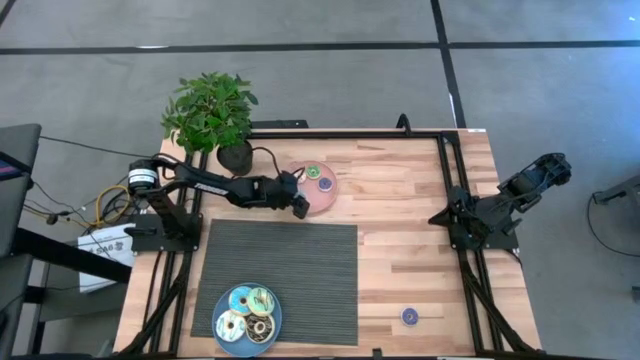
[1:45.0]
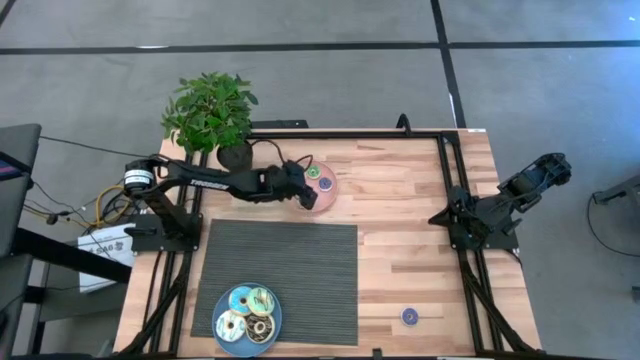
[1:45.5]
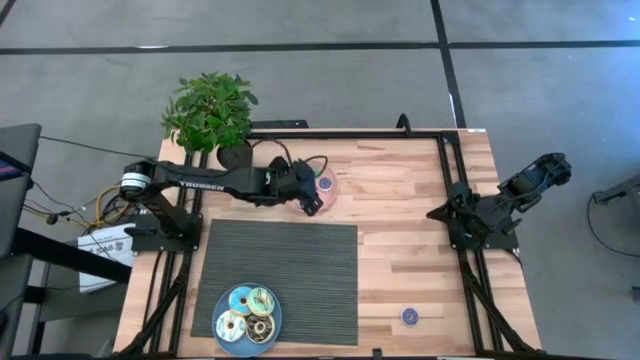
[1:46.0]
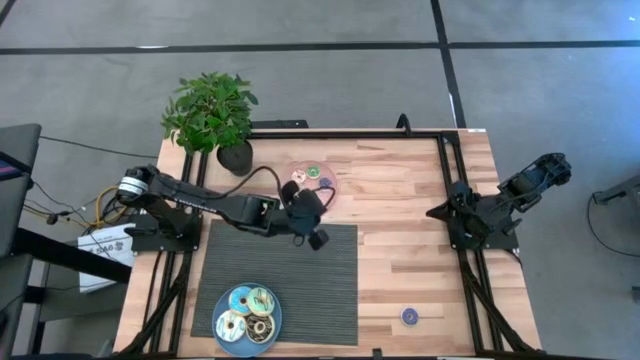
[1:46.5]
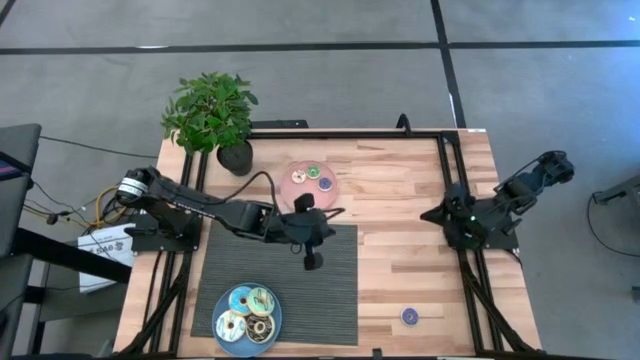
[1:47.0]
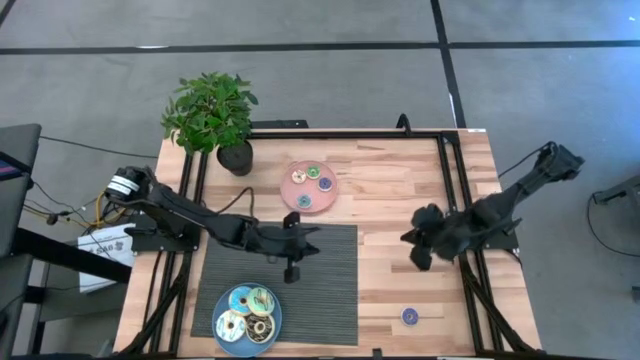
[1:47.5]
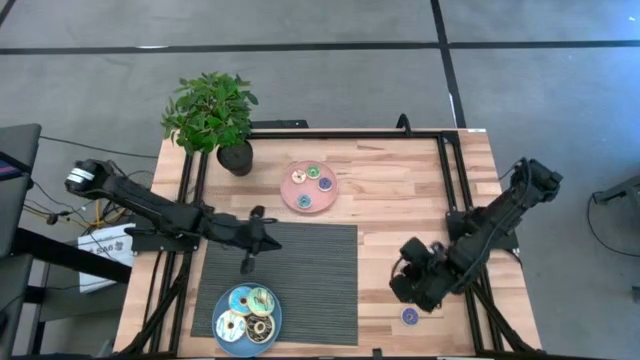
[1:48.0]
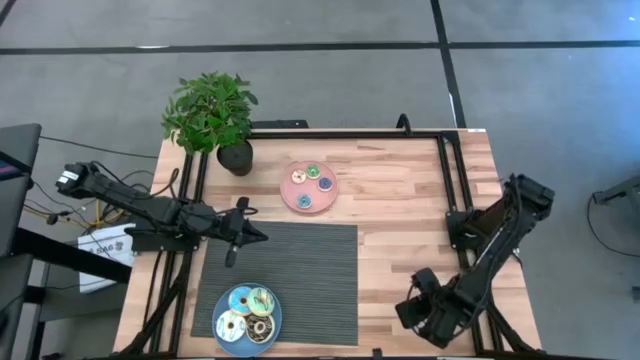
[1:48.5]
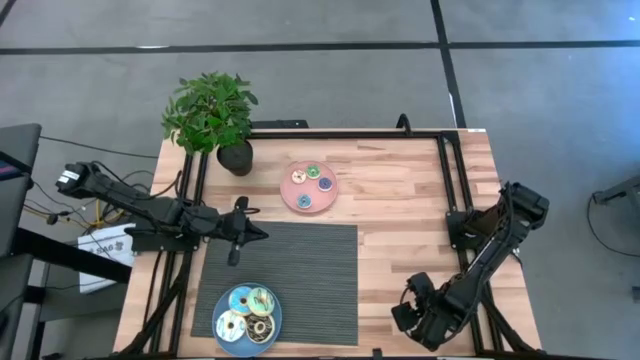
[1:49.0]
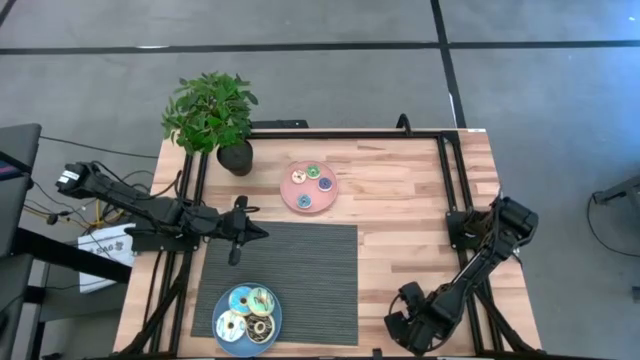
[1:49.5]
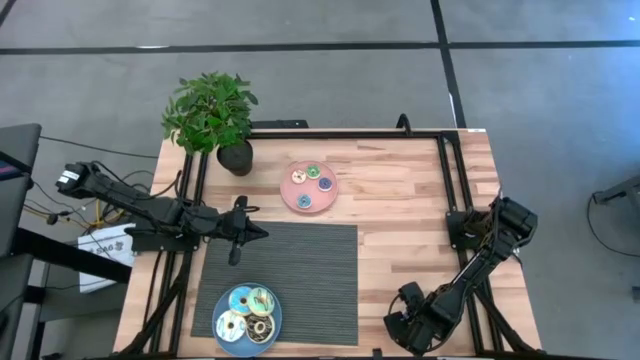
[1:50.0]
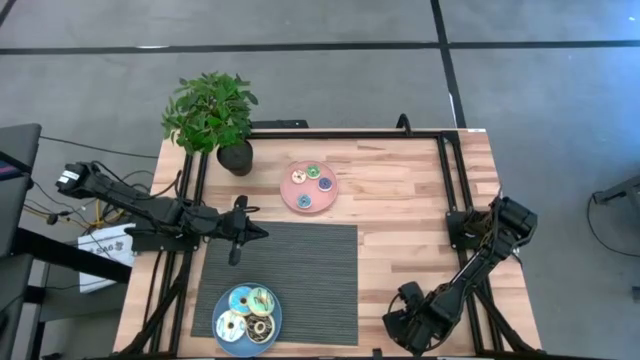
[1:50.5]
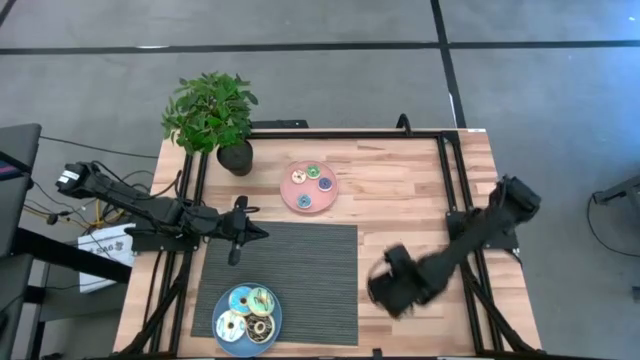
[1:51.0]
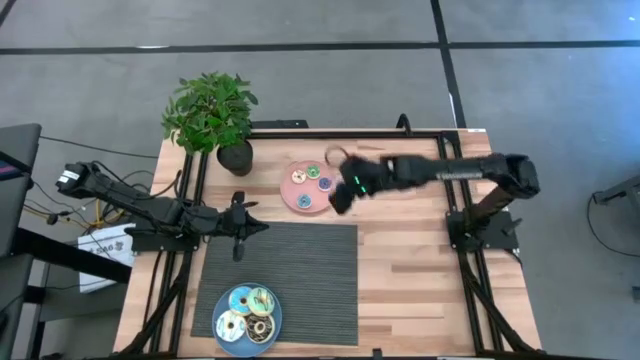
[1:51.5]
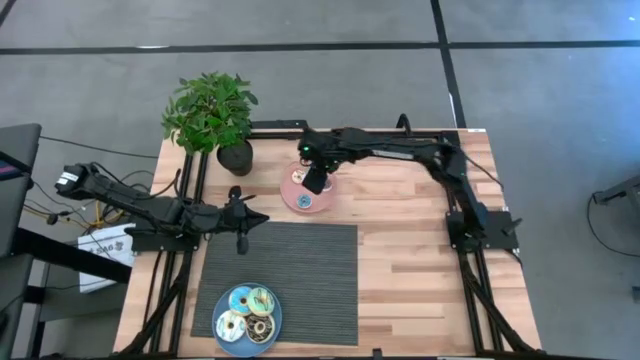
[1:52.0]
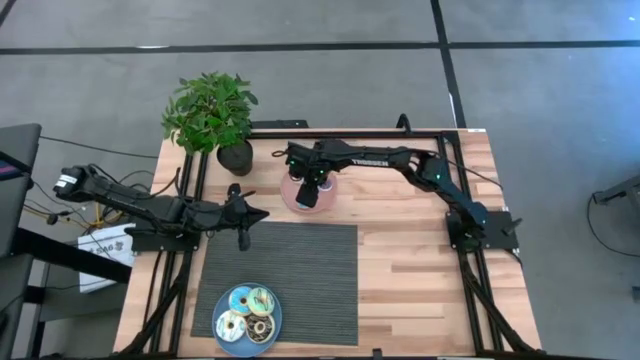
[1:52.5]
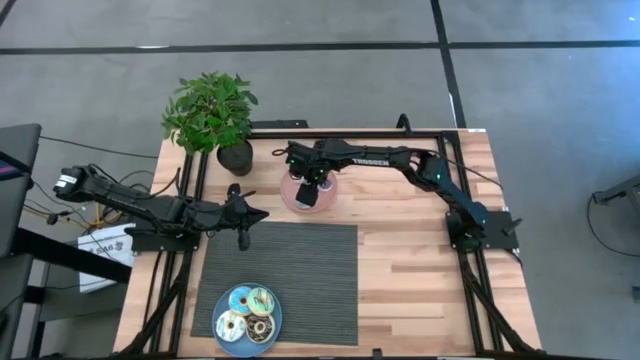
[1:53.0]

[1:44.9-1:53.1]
Task: Pick & Place donuts
Put the small dark blue donut on the pink plate

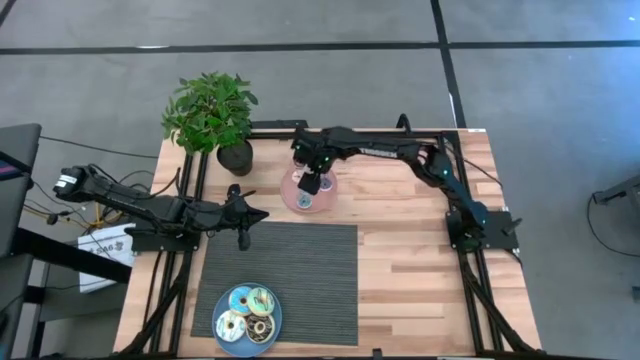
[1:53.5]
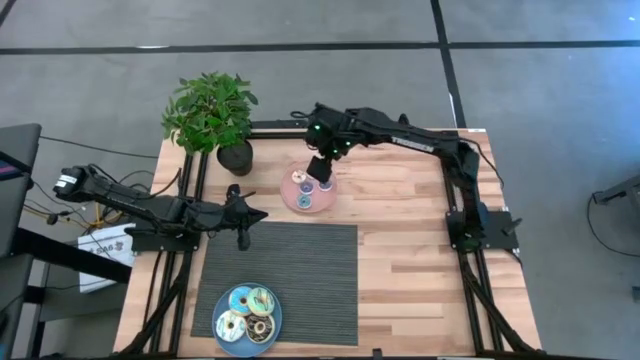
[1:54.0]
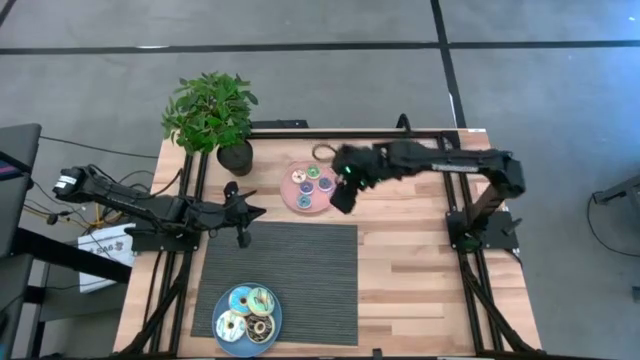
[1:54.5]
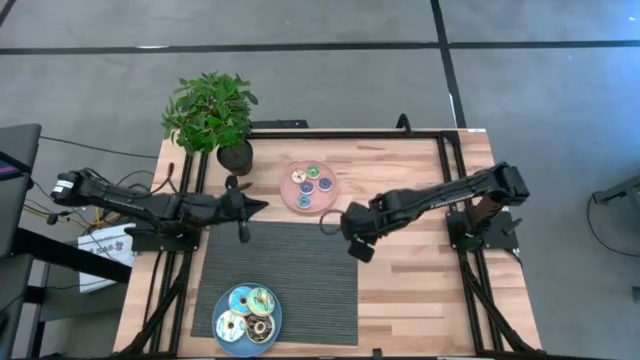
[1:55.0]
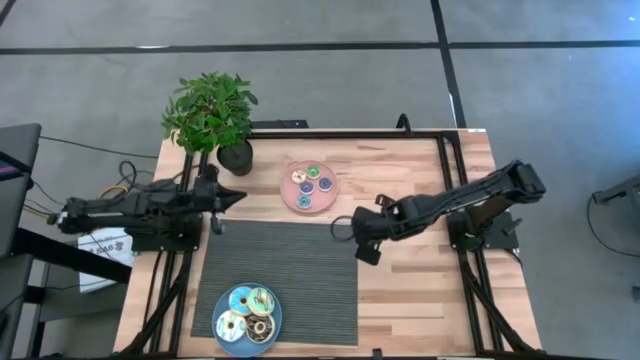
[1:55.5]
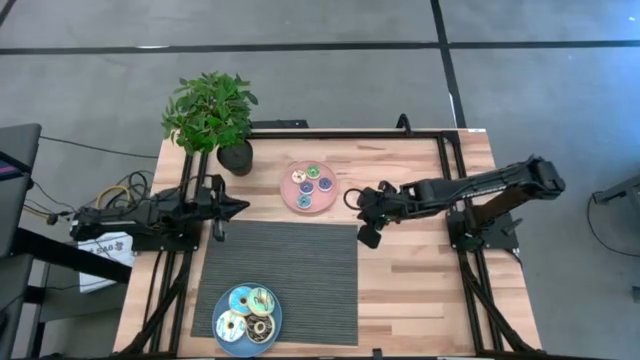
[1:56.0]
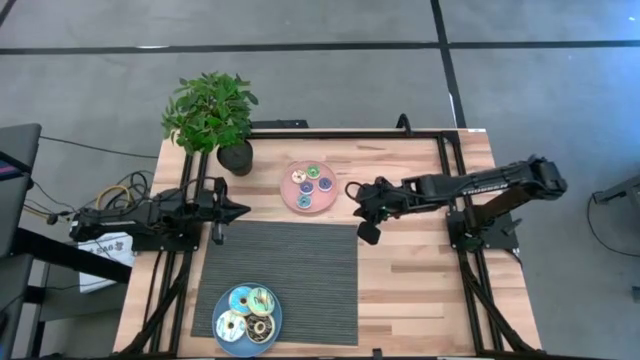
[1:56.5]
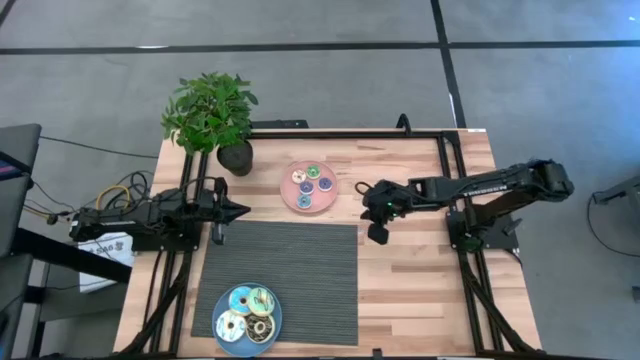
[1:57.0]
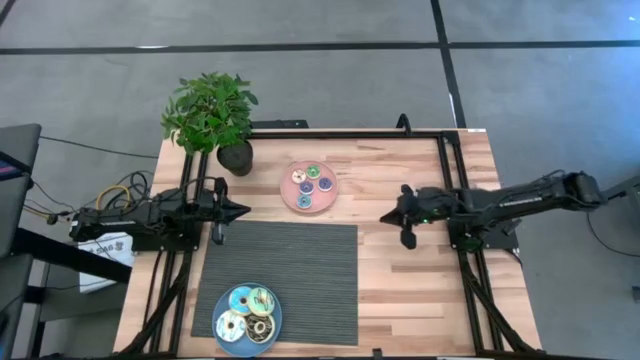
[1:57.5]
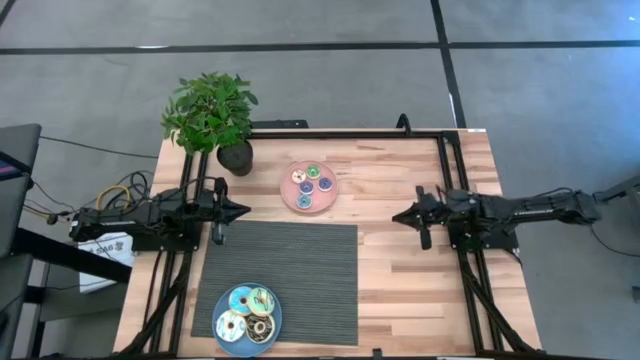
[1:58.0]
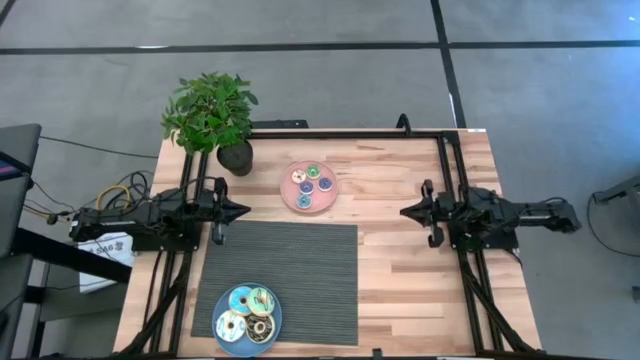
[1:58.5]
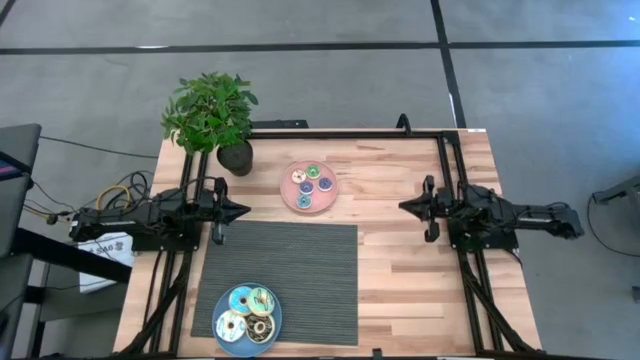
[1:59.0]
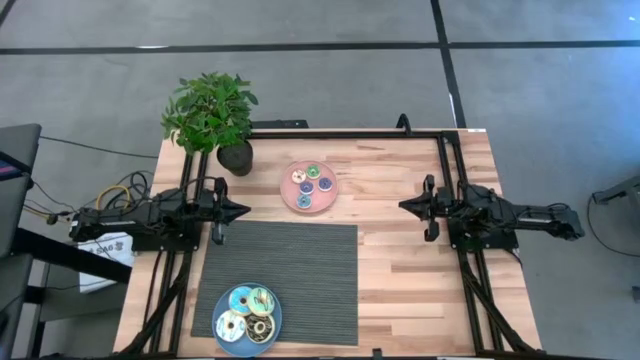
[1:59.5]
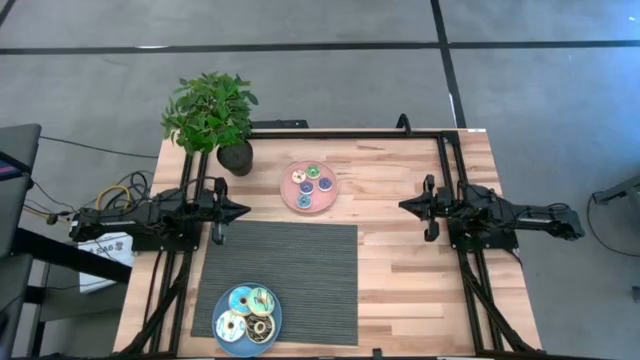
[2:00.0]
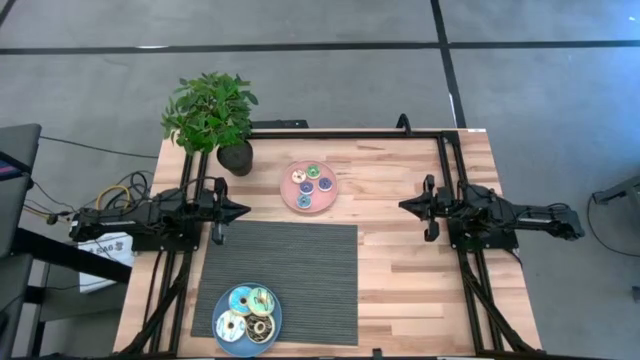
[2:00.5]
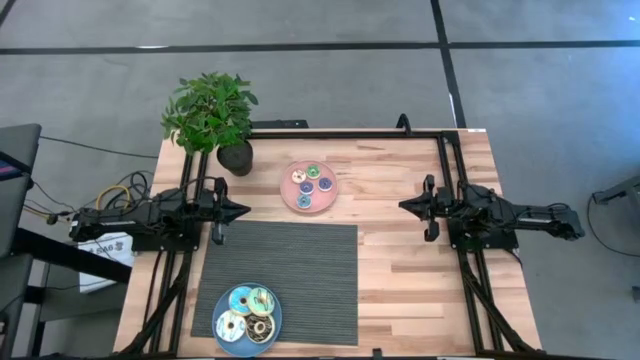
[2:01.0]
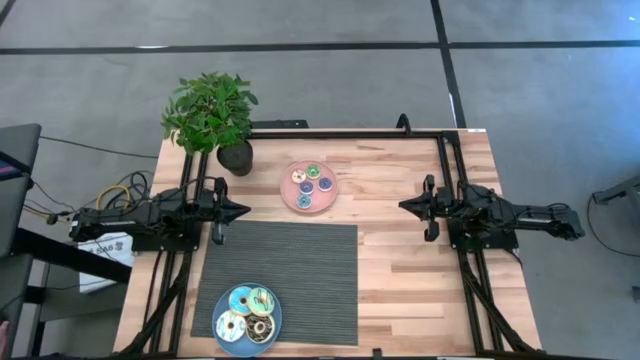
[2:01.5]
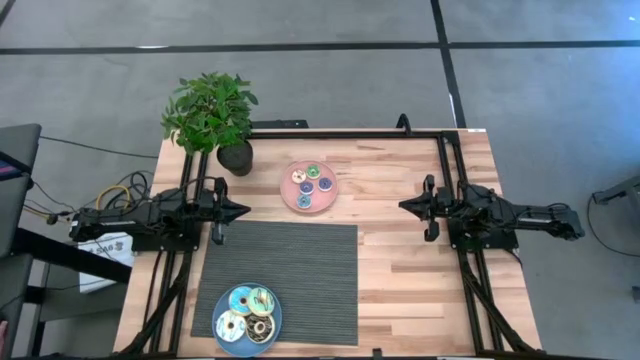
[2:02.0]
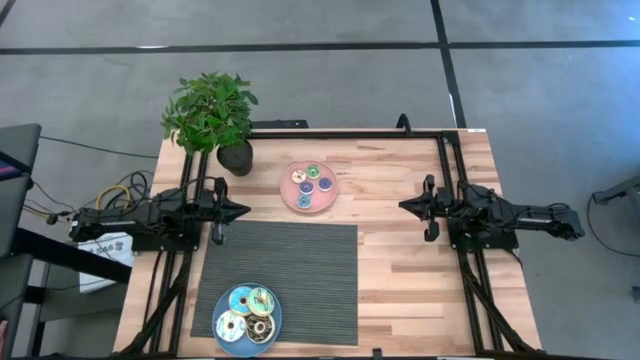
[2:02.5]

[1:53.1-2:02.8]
Return to Home Position

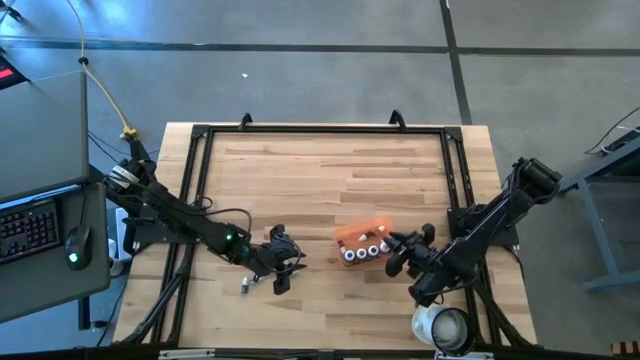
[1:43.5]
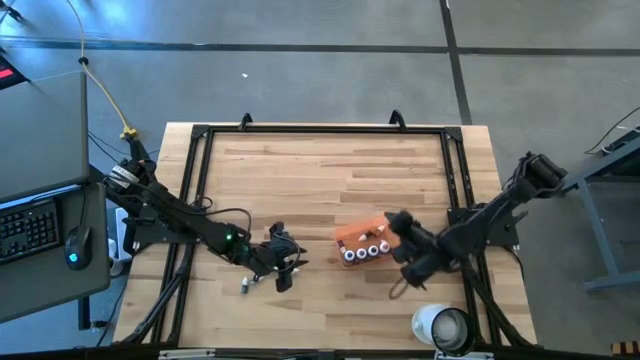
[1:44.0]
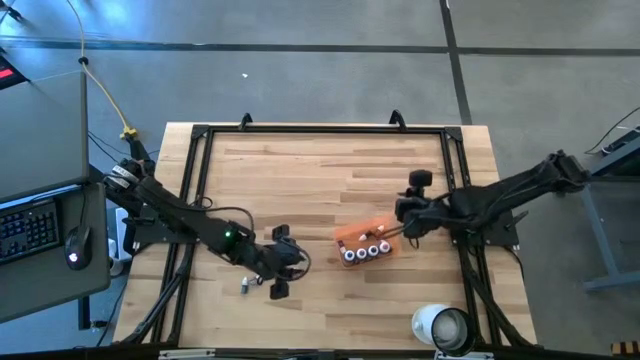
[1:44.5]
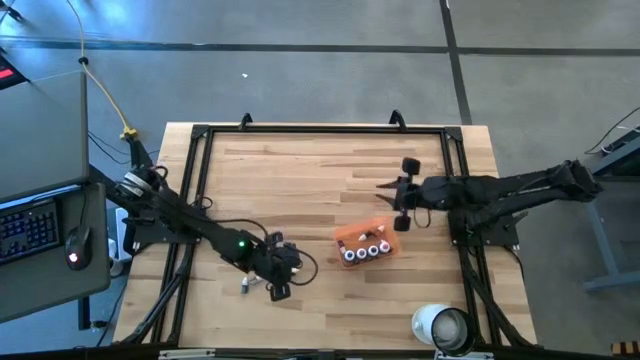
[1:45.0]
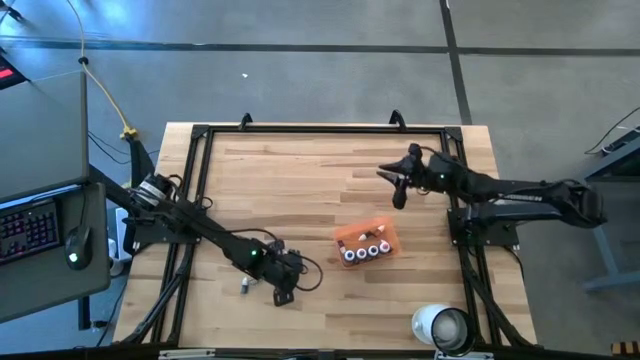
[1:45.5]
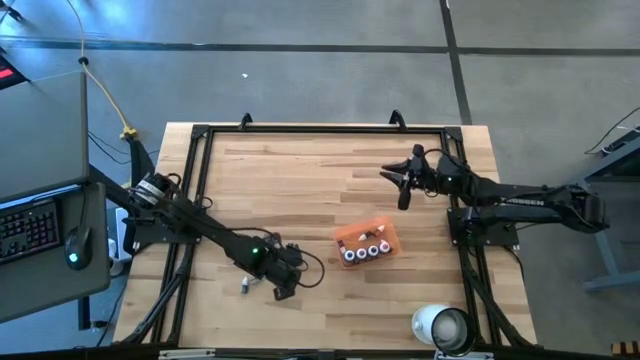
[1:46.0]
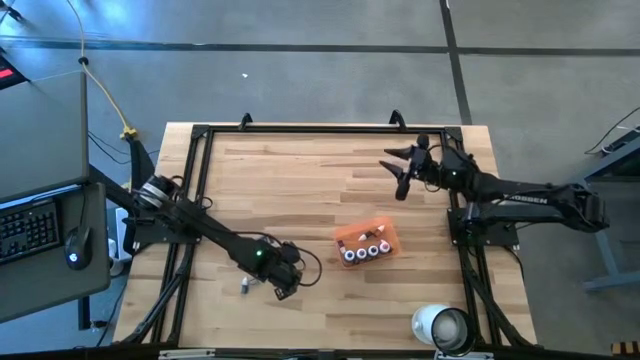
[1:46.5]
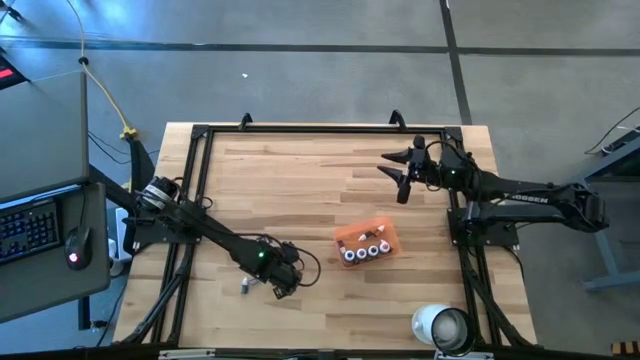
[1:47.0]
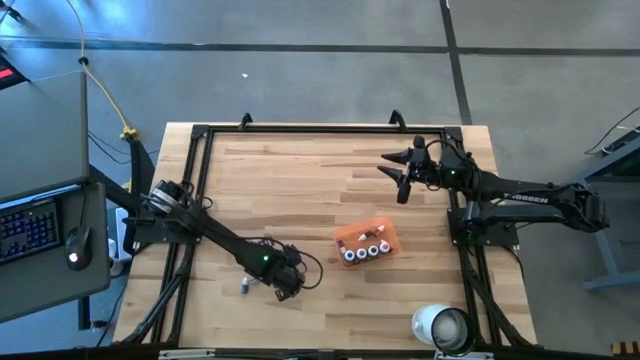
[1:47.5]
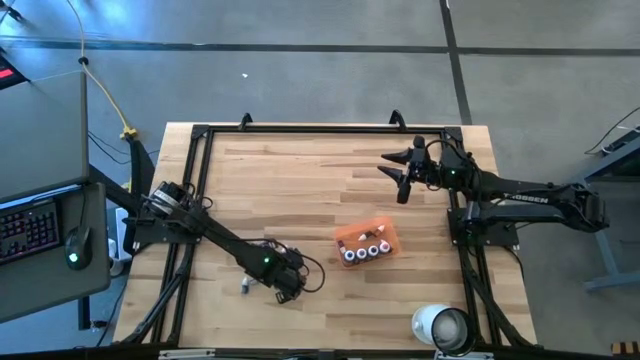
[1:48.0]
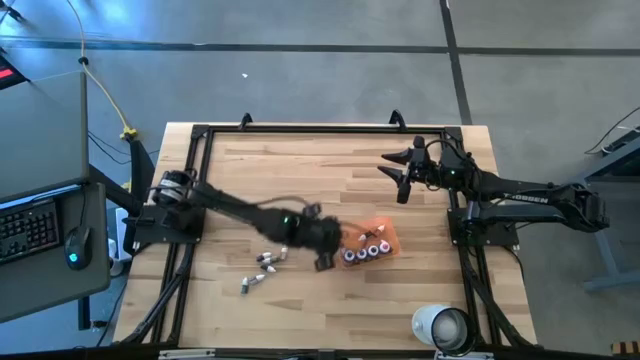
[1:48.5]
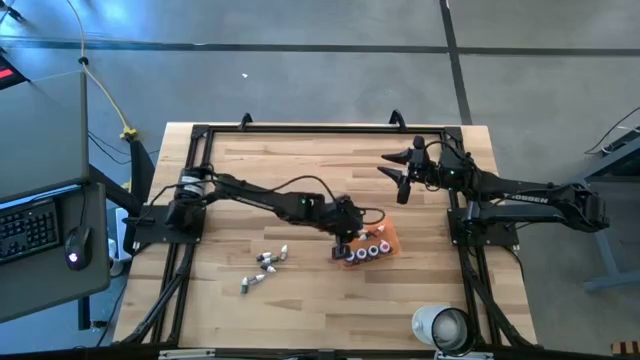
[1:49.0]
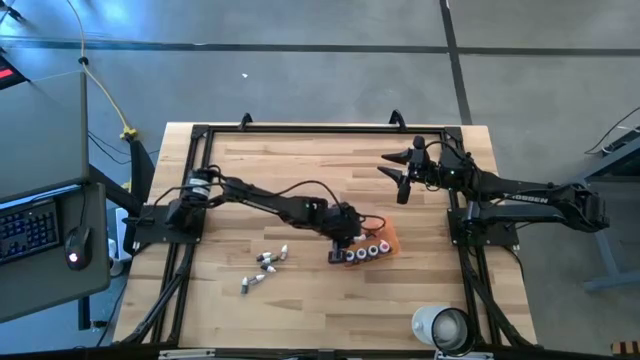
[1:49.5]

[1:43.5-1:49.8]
Task: Pick & Place food coloring
Put the small black food coloring bottle into the orange bin
